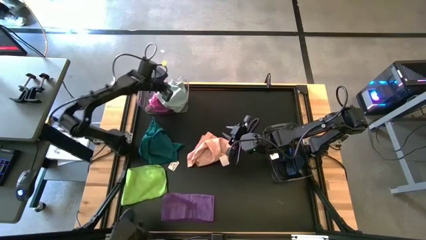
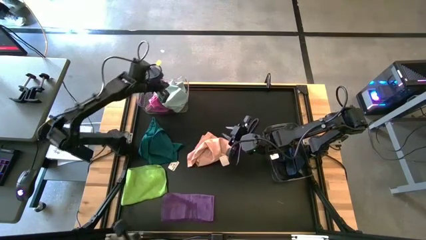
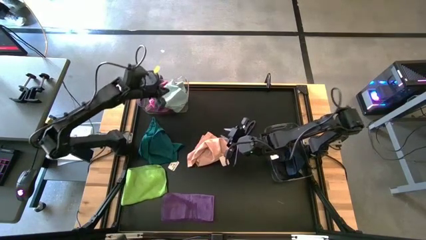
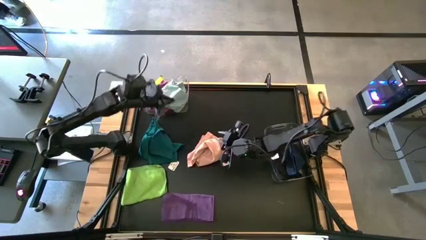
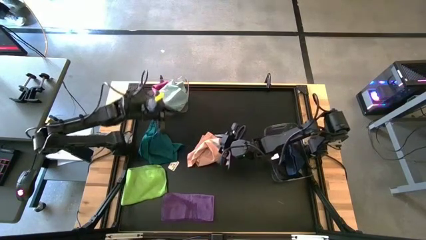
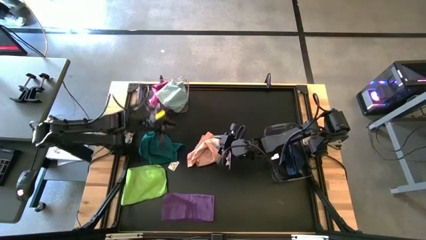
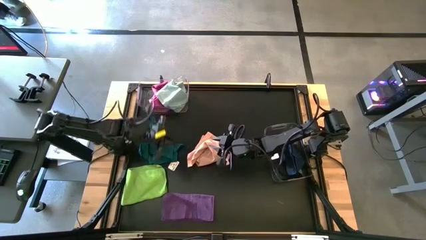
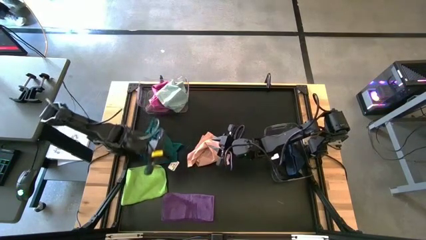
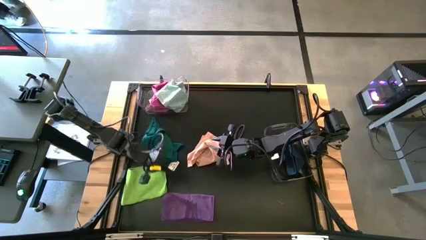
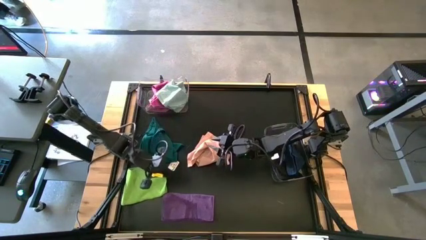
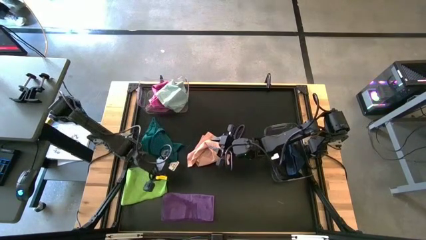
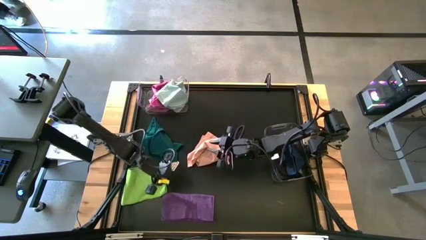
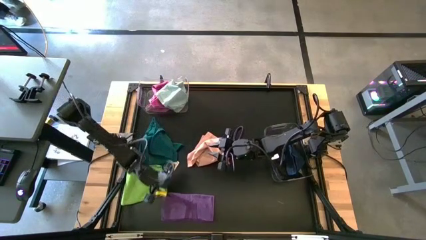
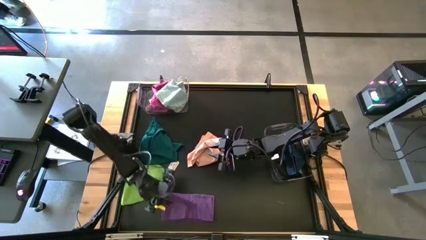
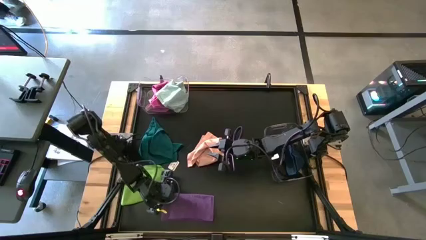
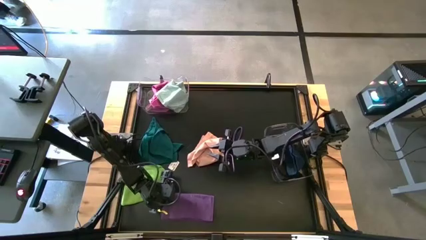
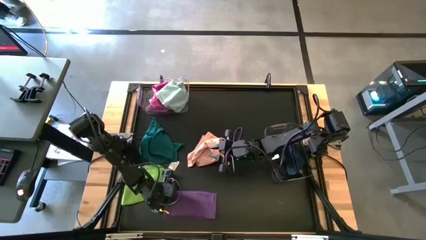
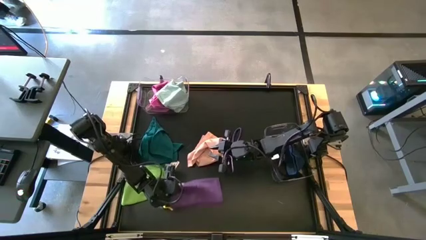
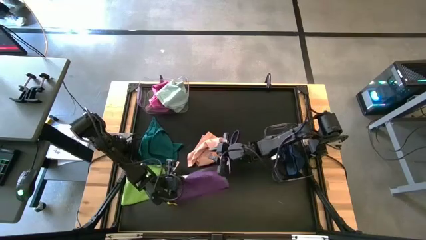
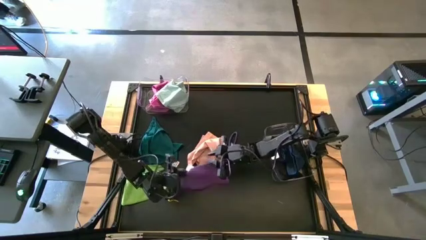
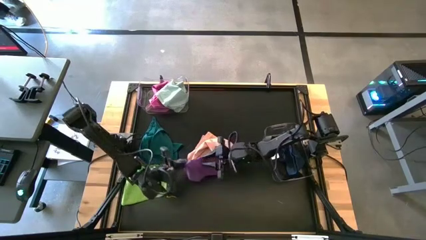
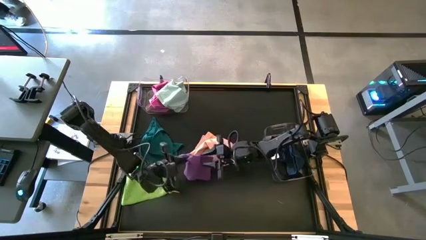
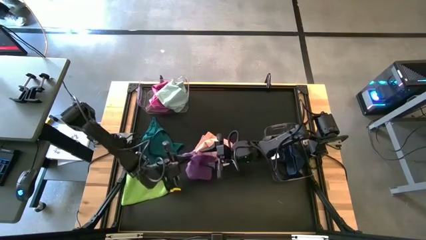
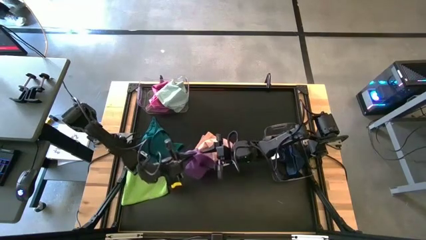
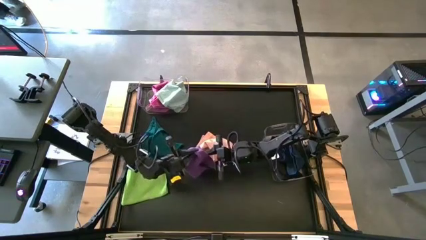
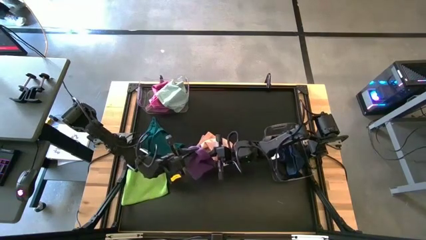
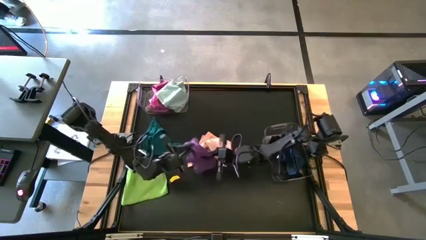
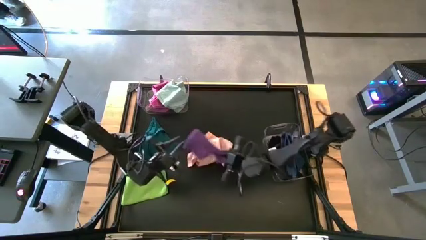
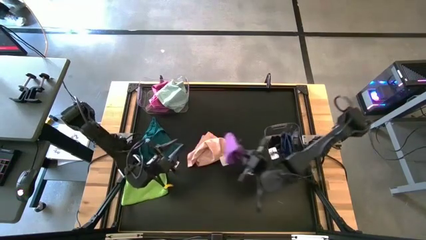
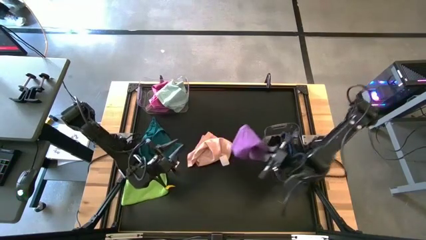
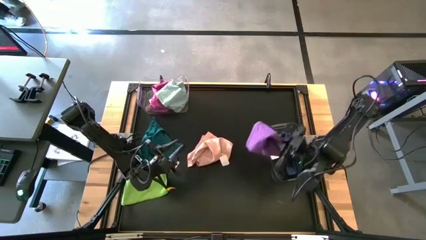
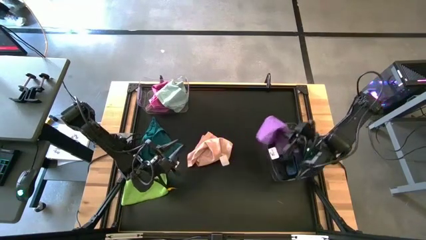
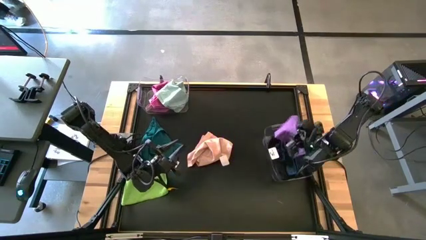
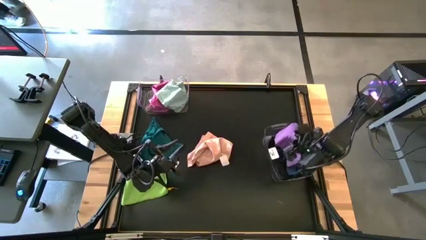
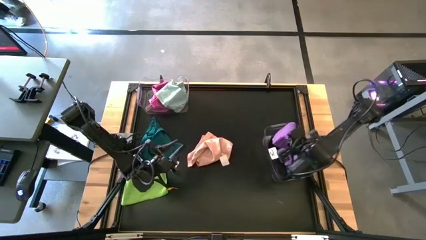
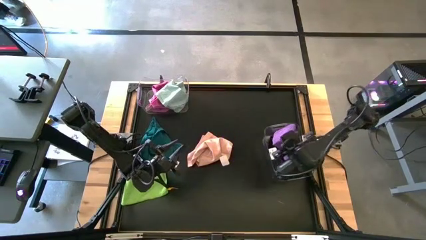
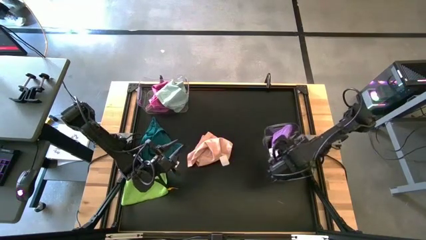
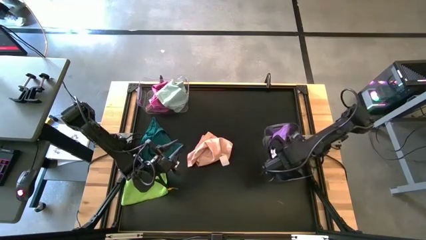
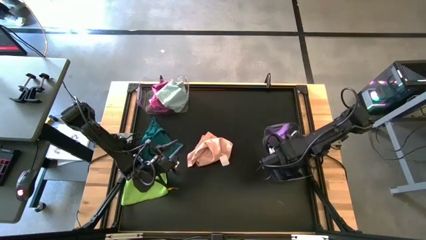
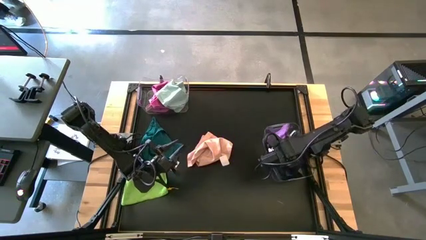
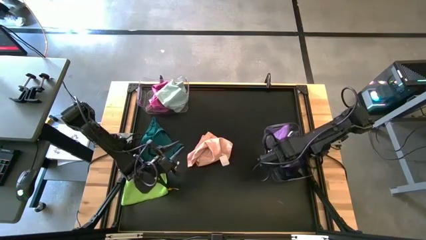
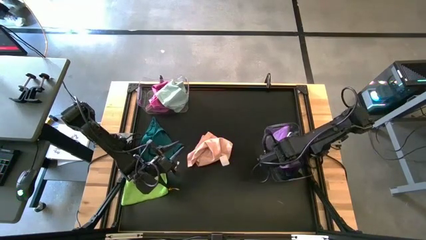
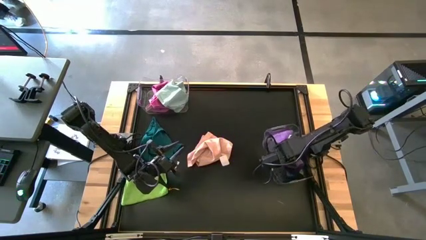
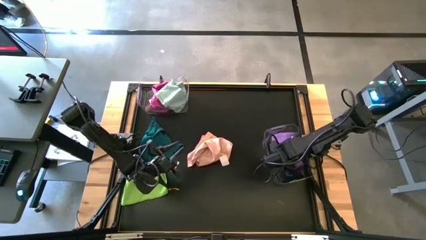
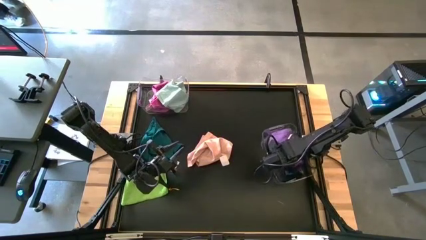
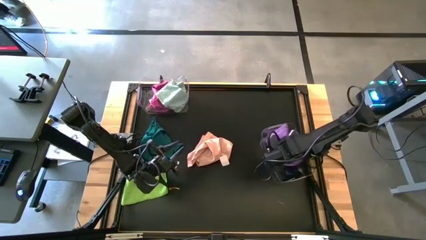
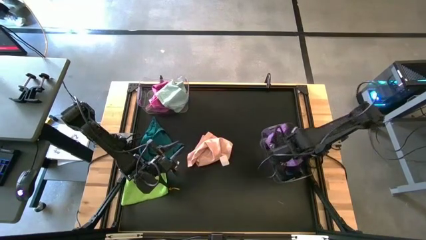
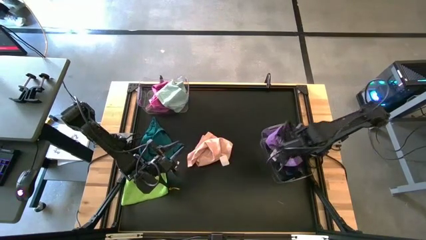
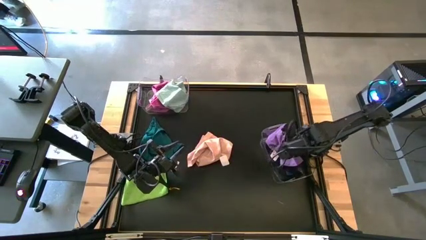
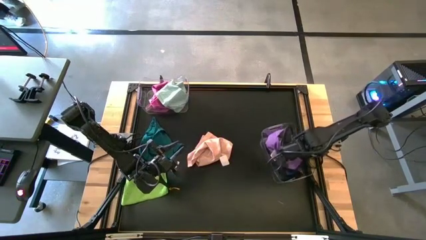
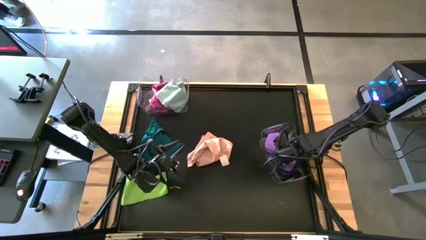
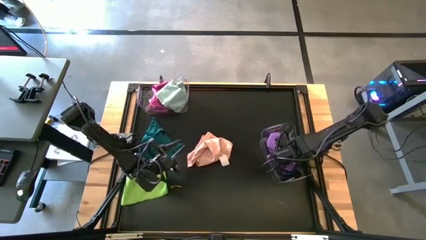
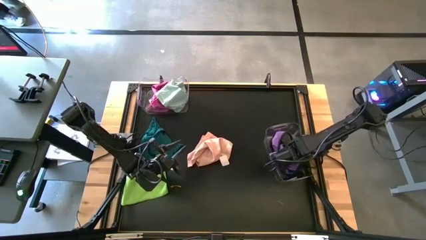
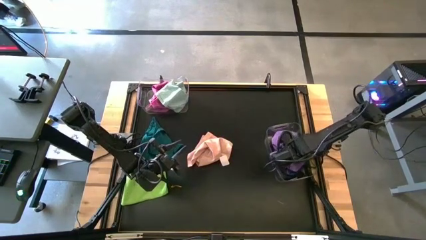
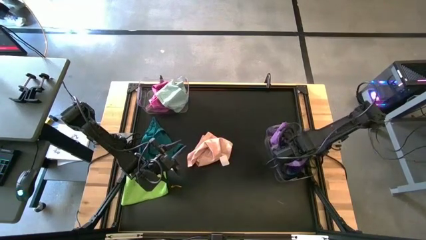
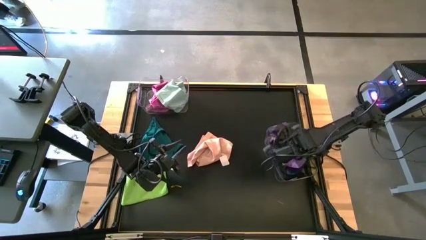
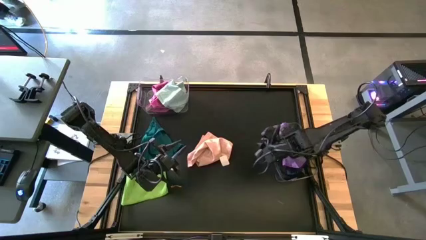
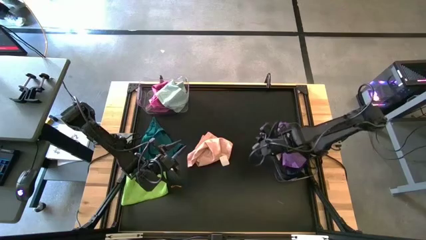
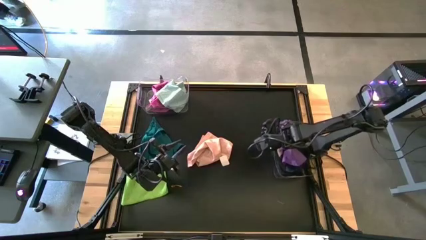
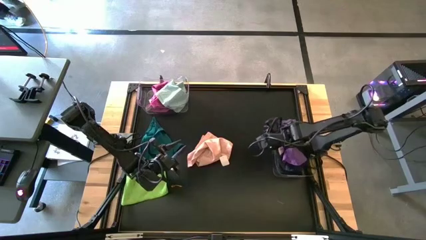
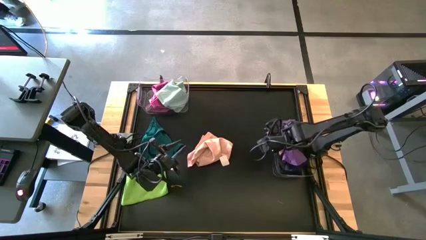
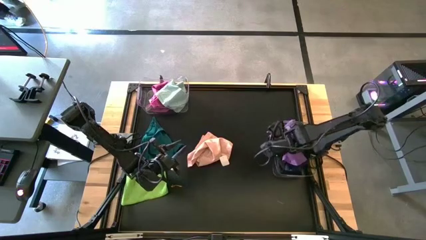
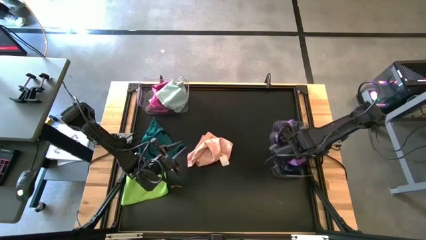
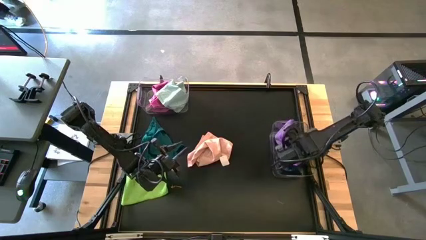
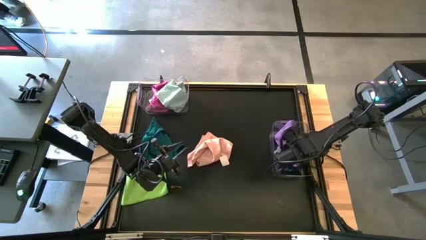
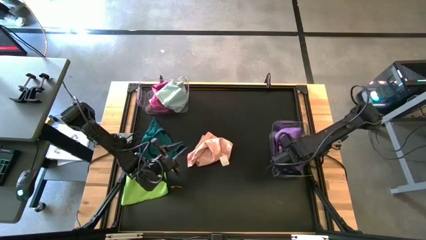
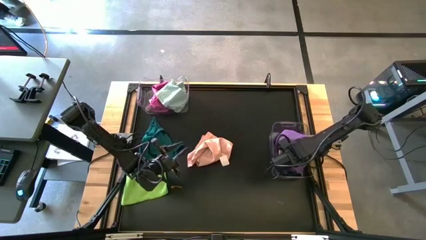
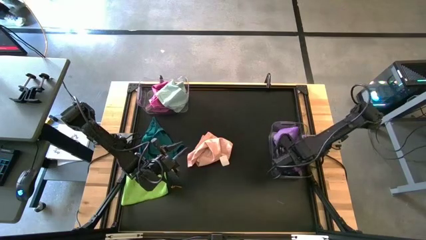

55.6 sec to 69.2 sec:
Task: Sort towels by color in basket
Put the violet towel into the bottom transparent bin
